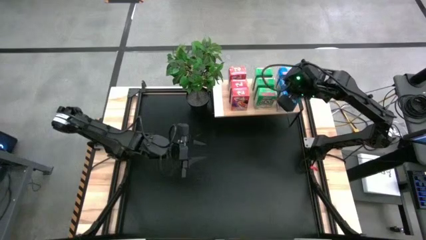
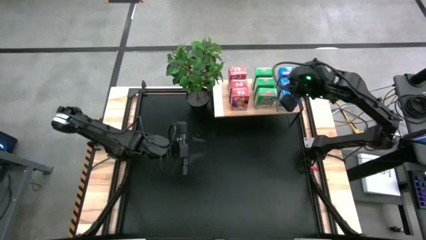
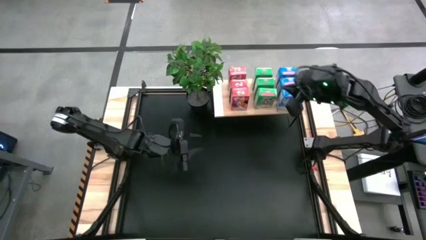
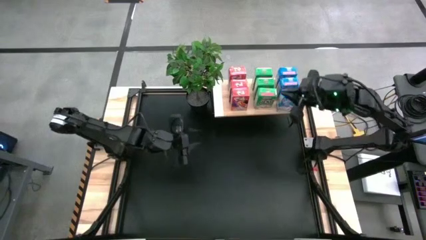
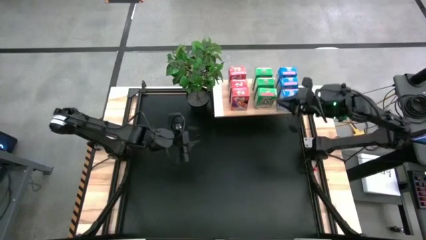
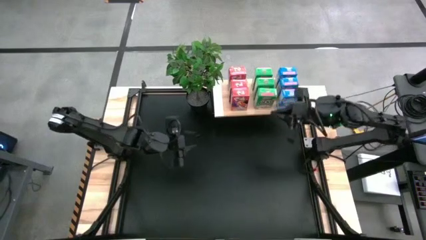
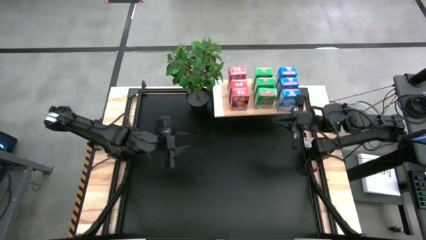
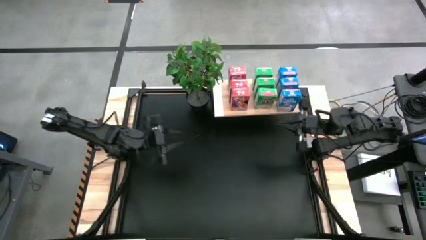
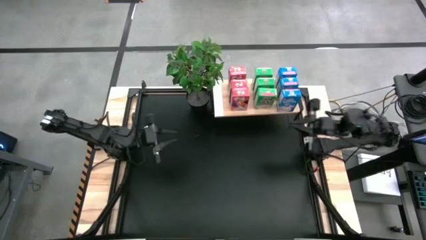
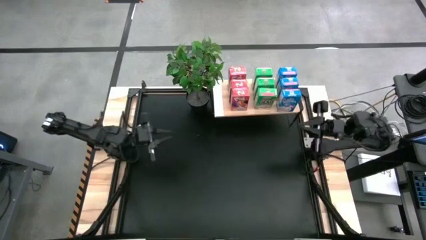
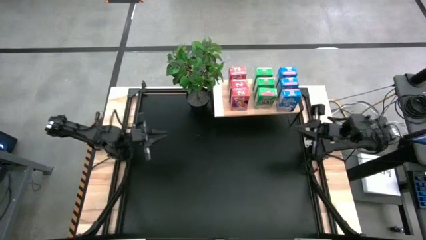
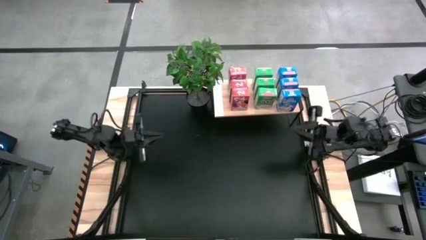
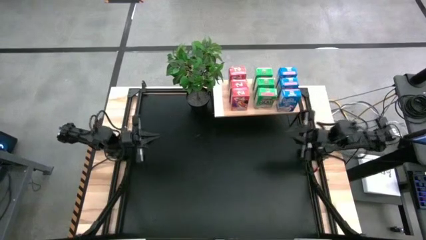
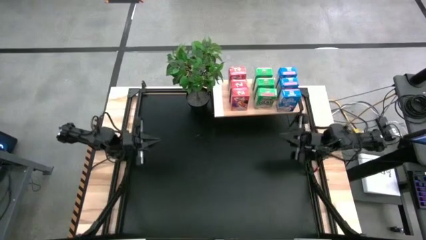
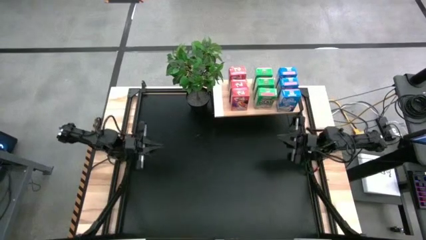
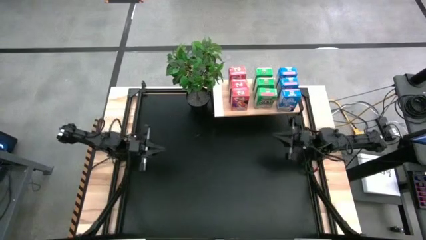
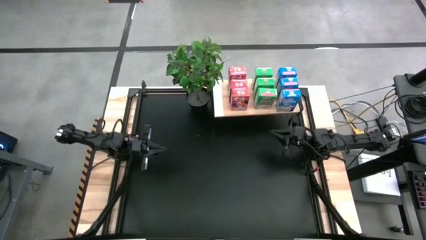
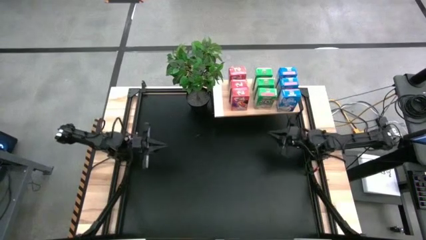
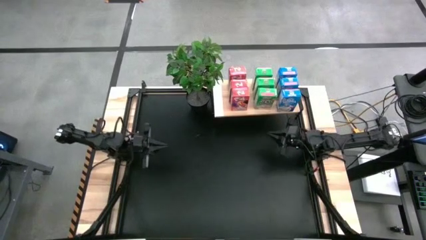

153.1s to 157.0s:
Task: Stack cereal on shelf
Return to Home Position

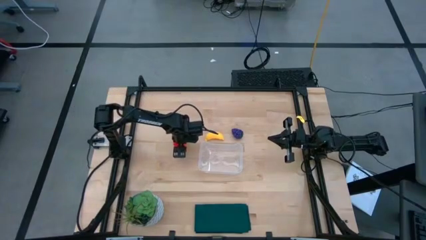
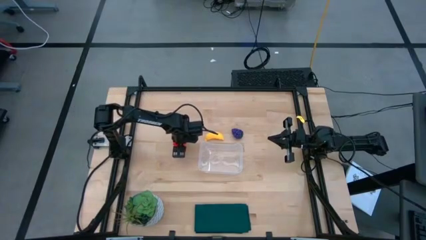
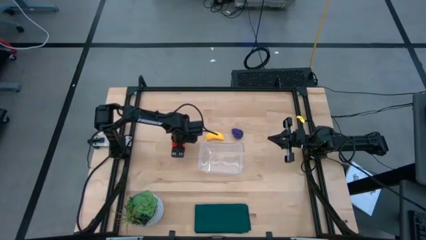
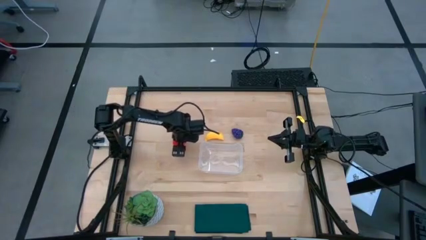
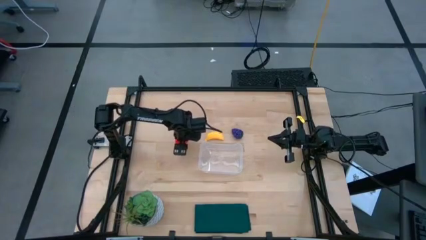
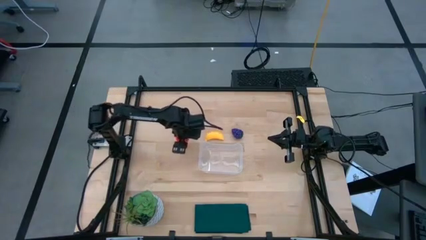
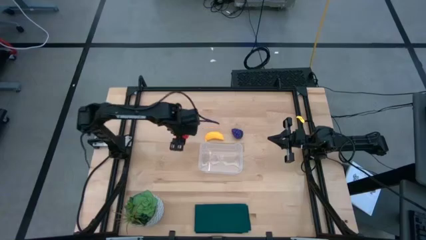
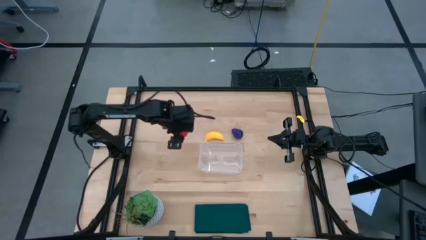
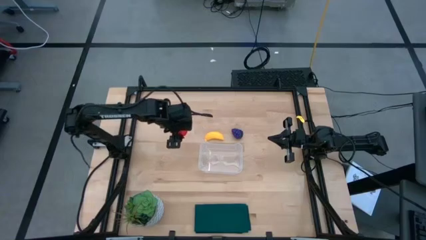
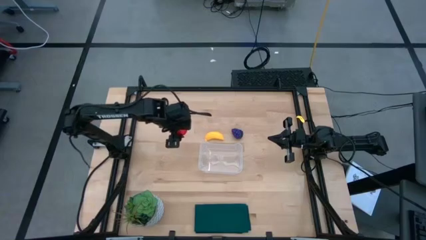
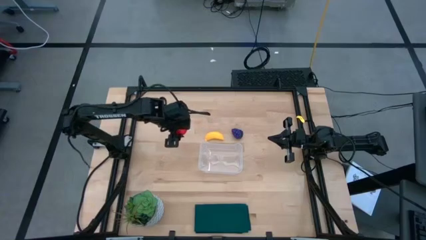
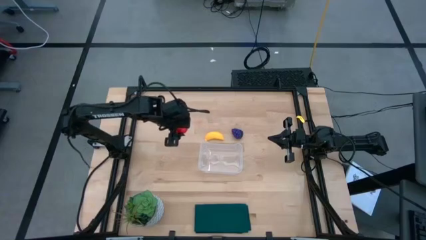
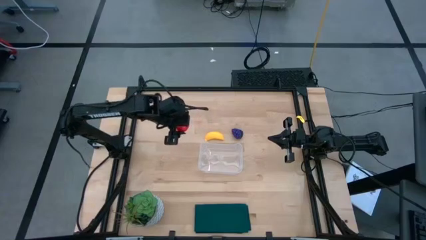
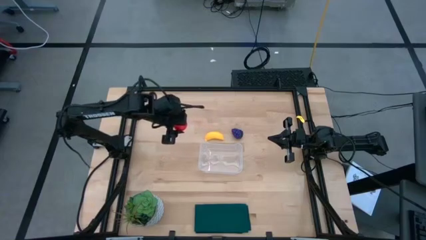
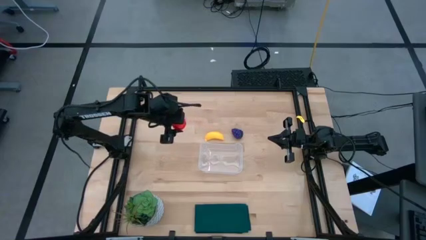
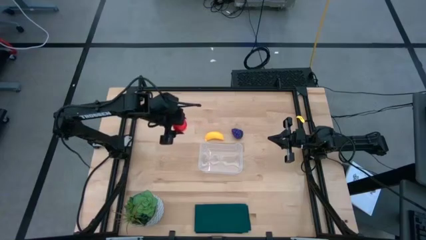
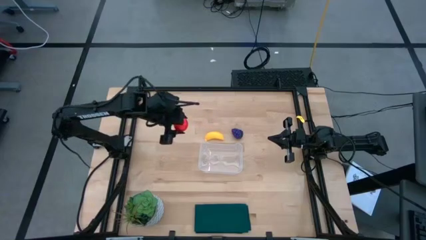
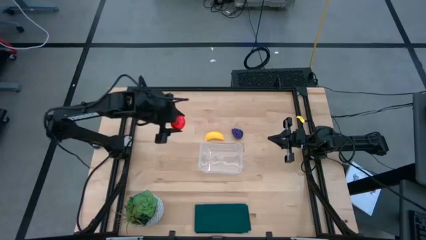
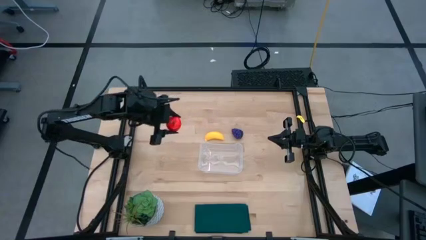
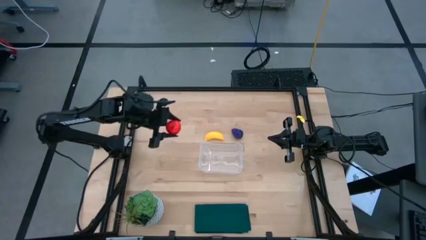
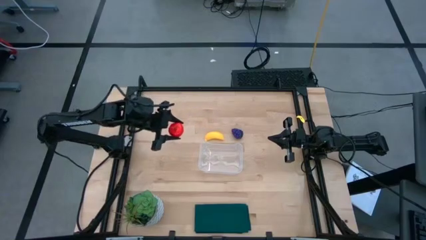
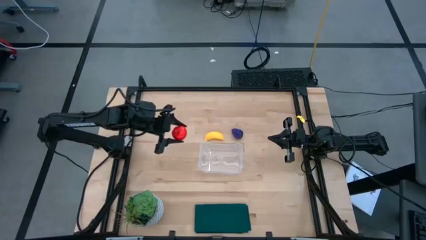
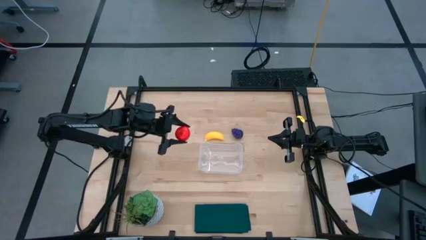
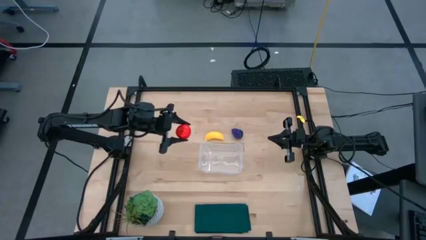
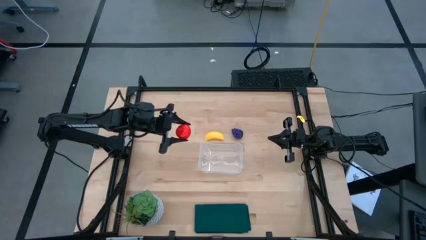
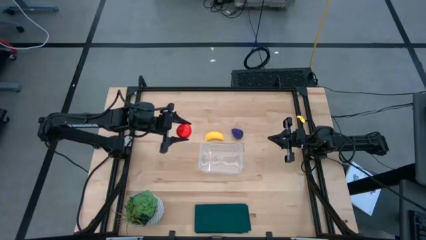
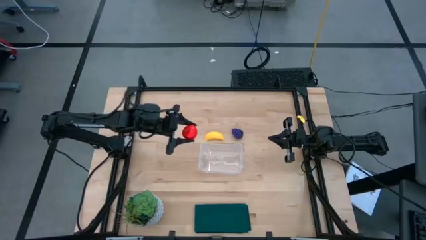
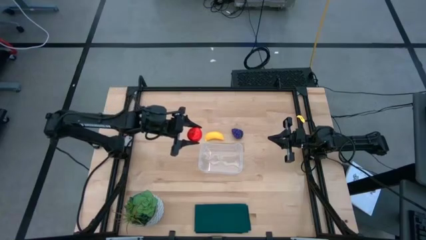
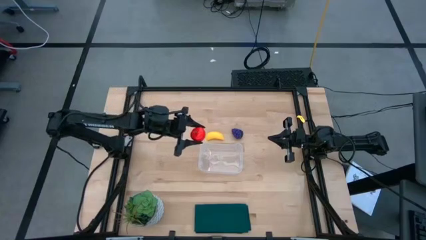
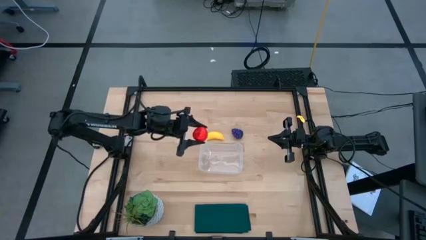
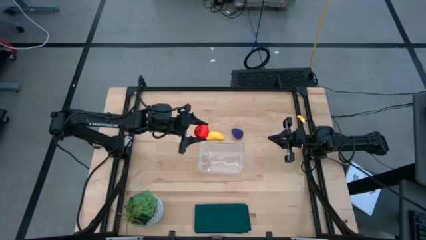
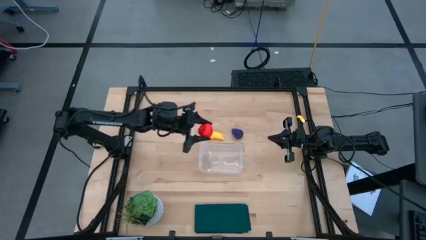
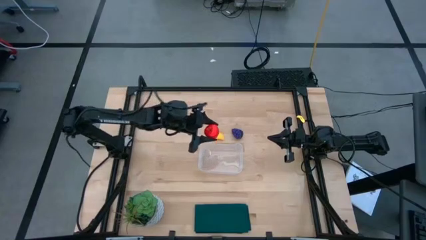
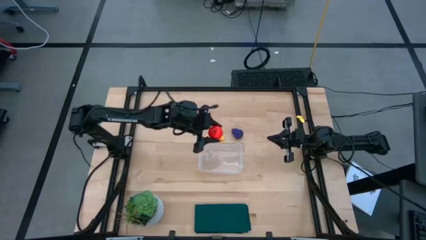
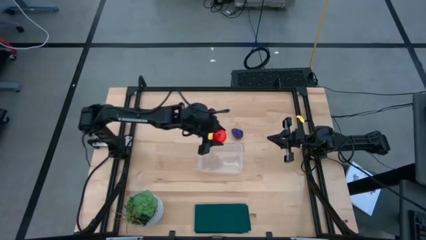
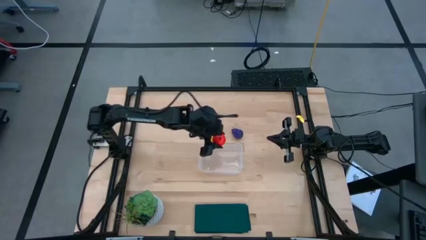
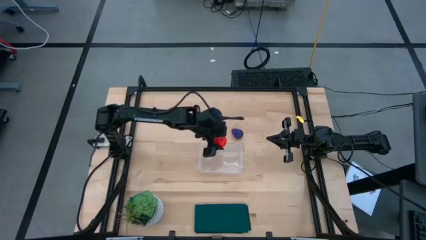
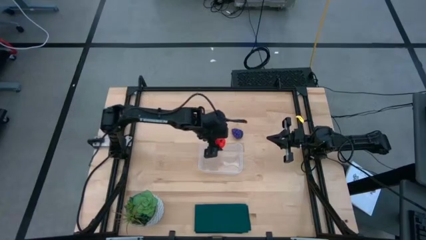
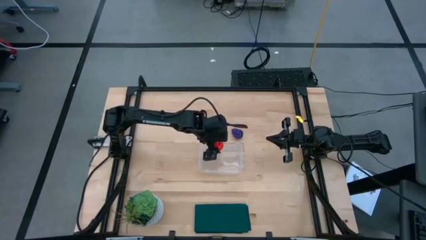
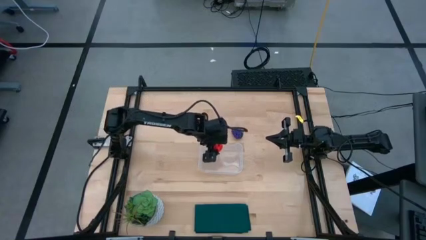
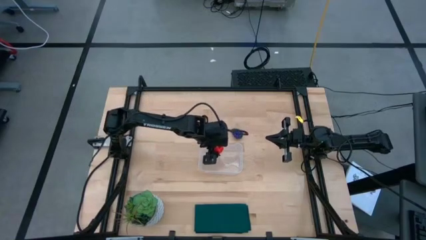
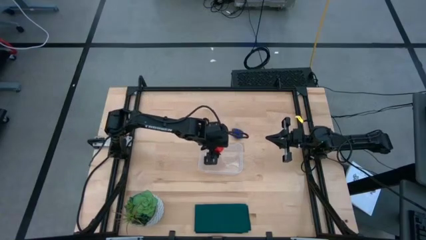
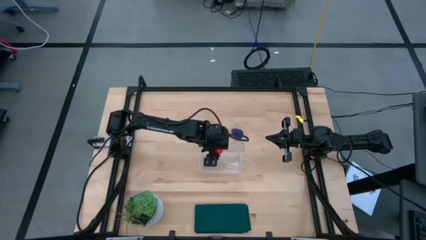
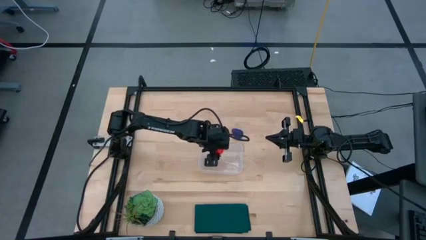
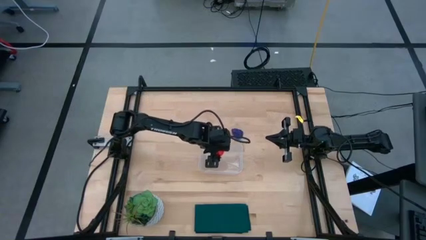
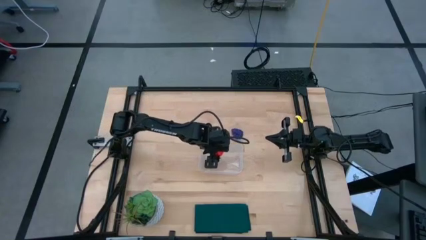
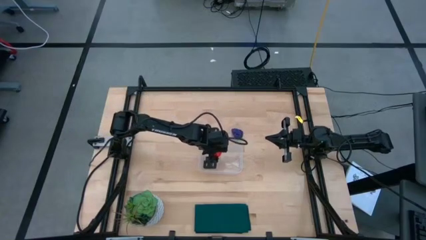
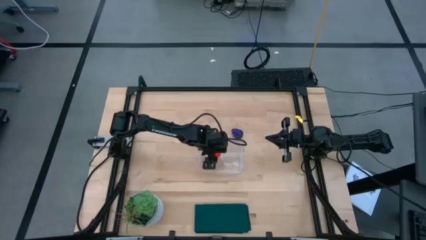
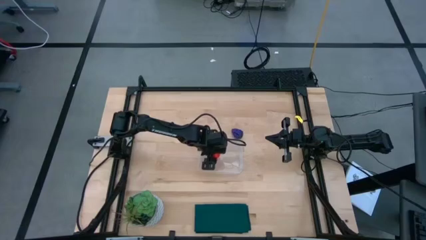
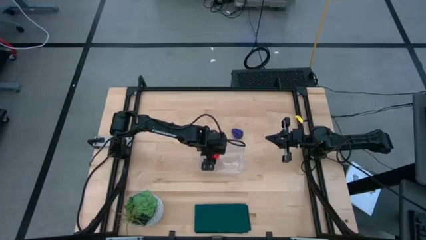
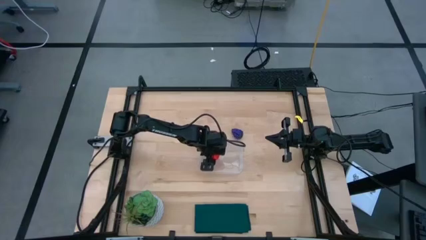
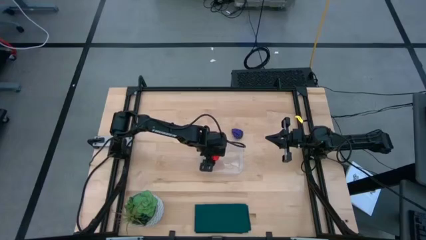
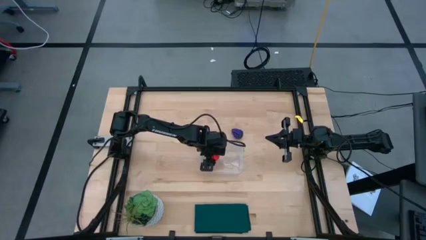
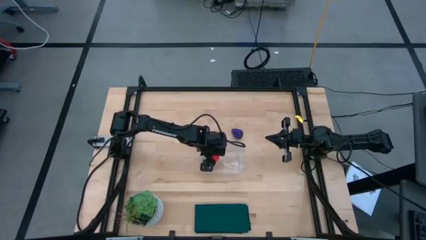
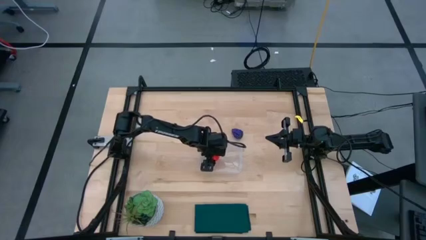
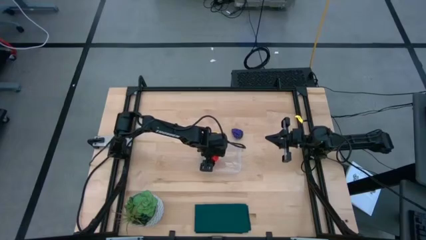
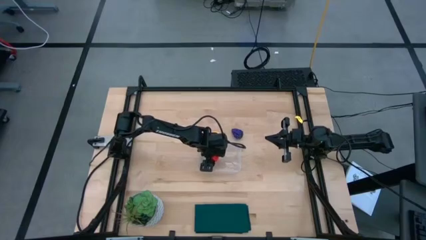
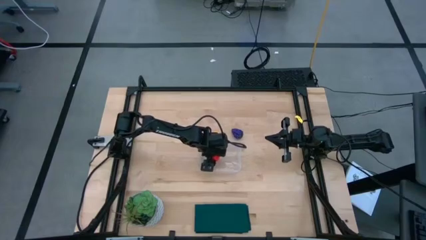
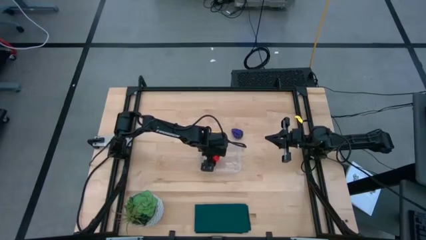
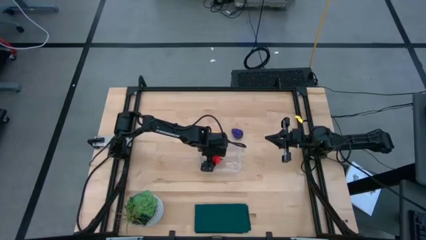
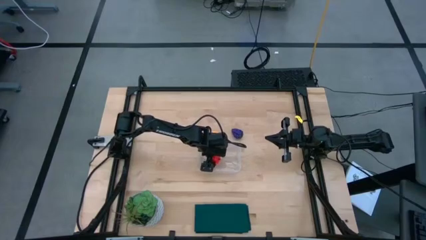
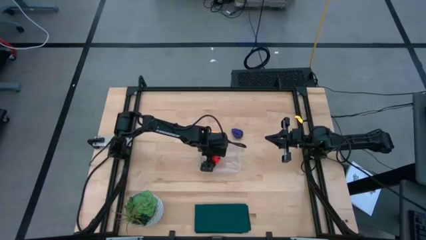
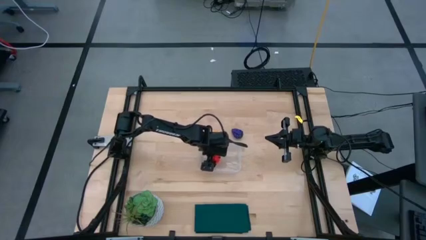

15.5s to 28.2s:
Task: Pick and placing Produce into tupperware
Put the apple into the transparent bin
